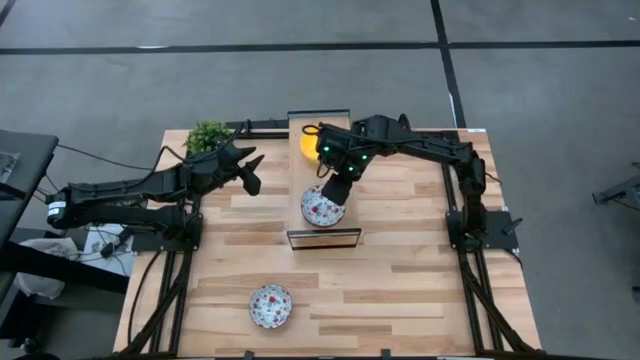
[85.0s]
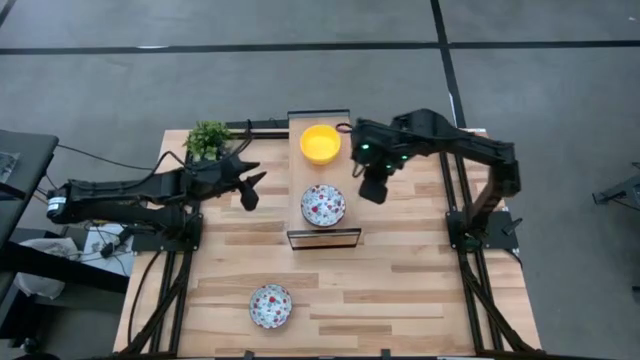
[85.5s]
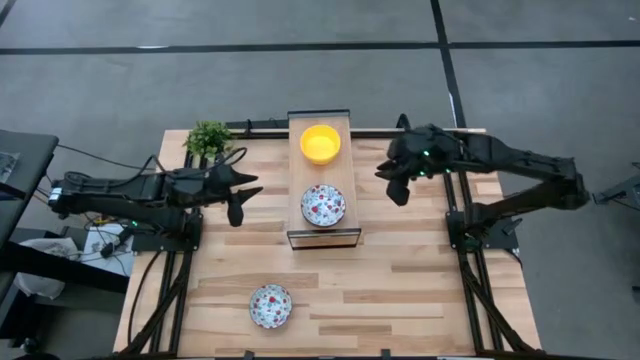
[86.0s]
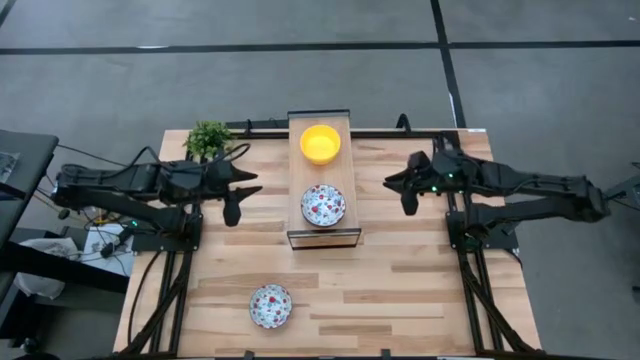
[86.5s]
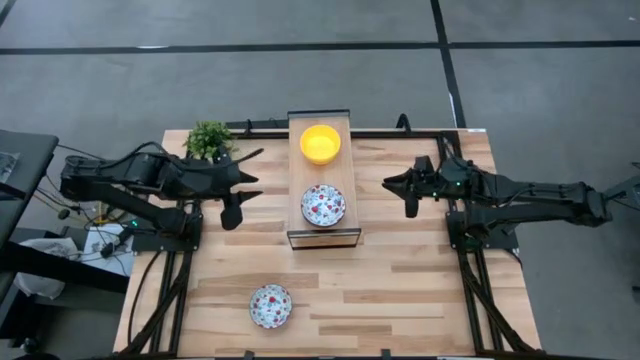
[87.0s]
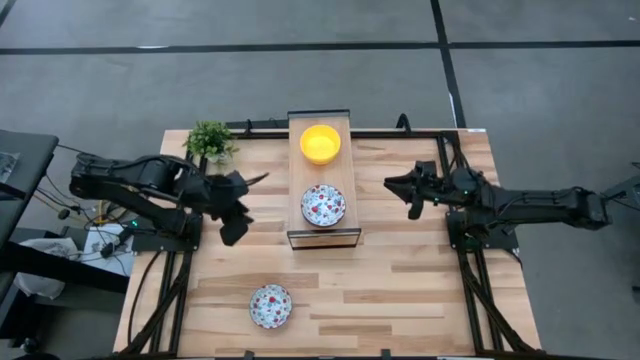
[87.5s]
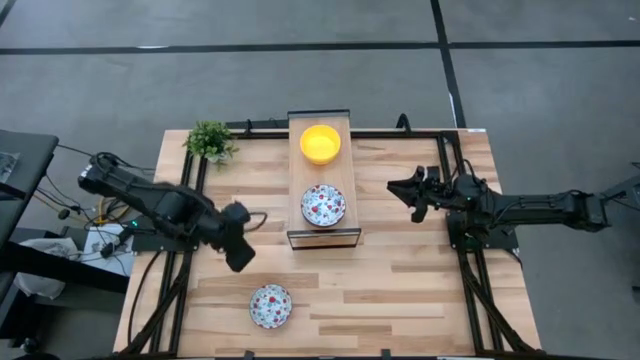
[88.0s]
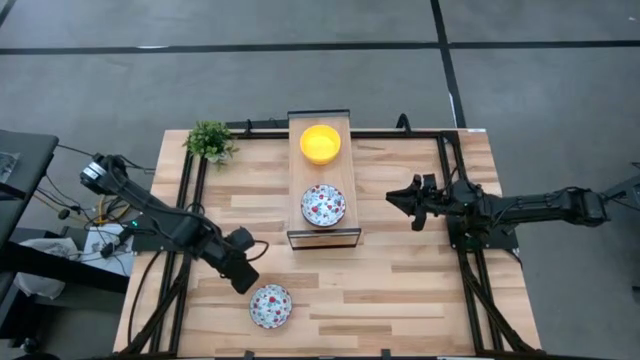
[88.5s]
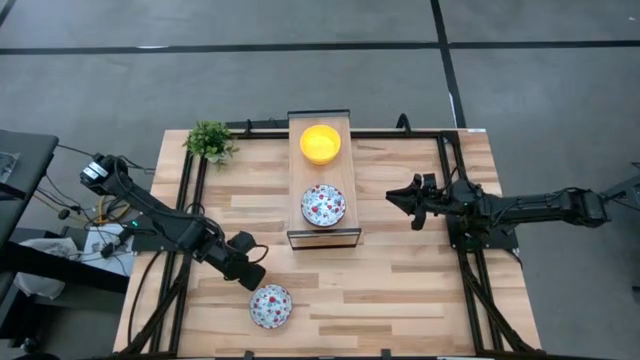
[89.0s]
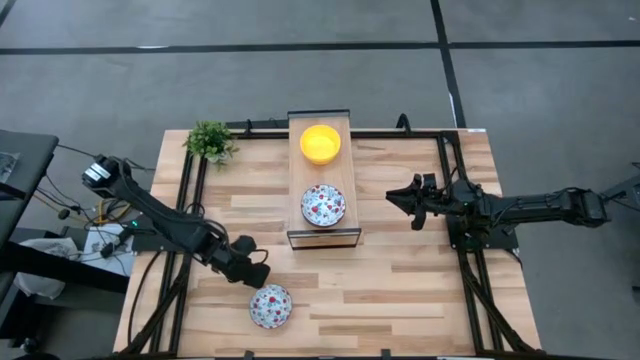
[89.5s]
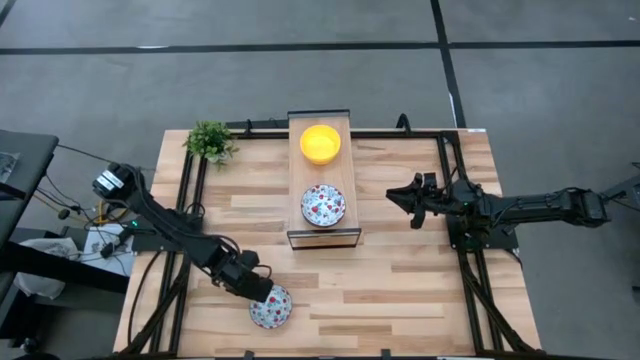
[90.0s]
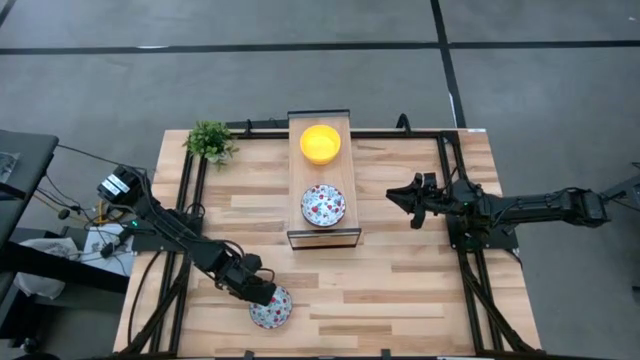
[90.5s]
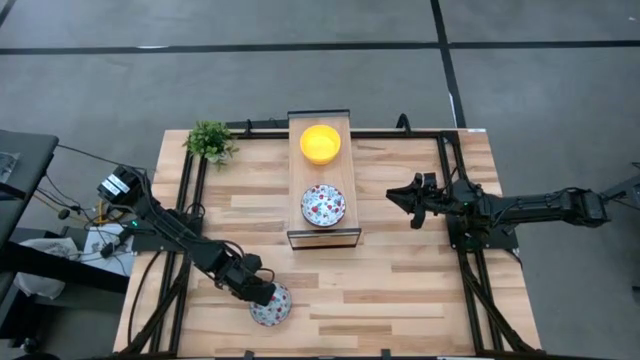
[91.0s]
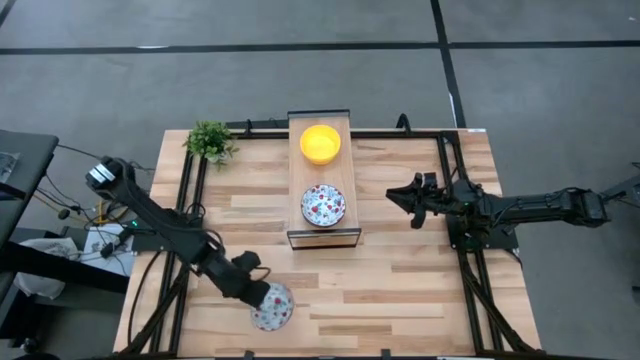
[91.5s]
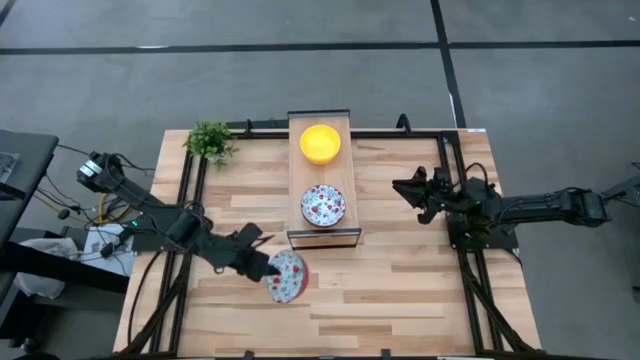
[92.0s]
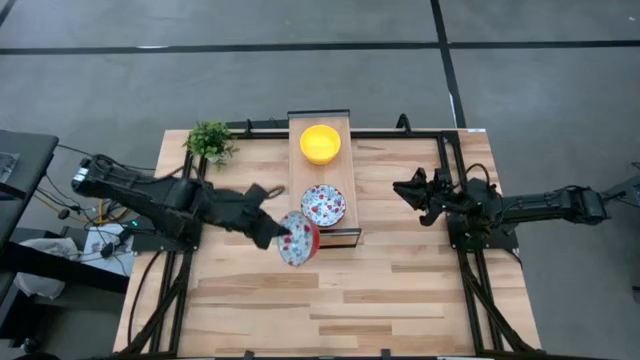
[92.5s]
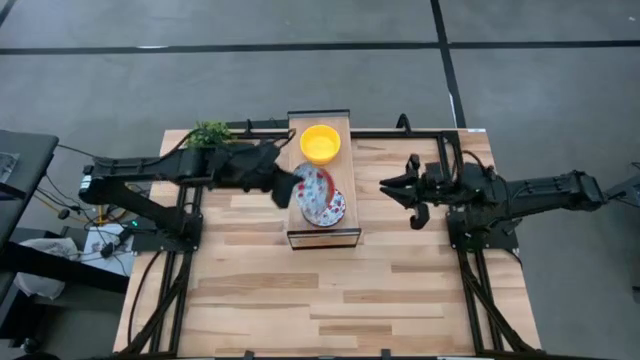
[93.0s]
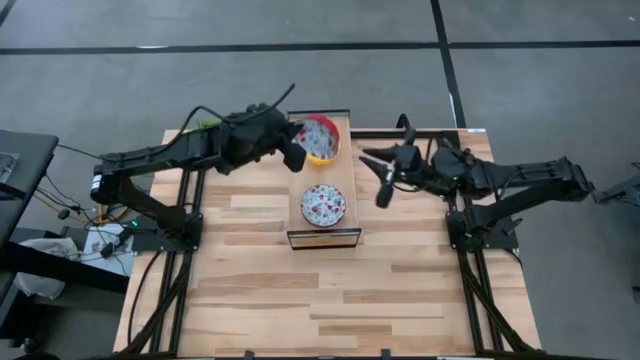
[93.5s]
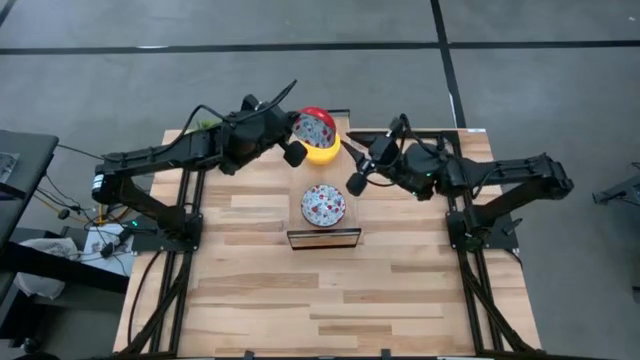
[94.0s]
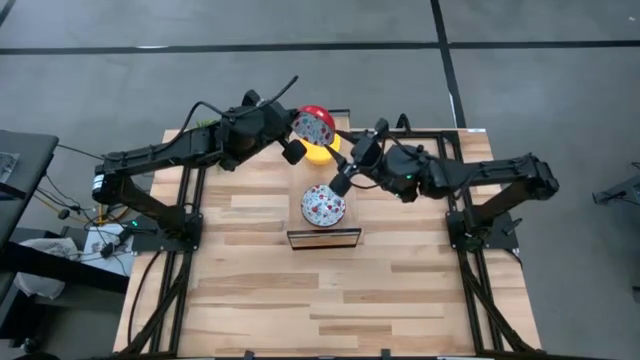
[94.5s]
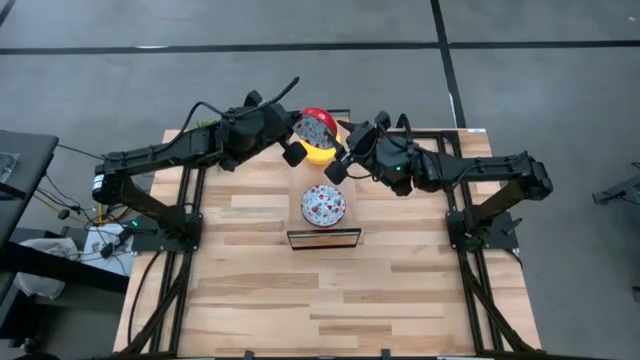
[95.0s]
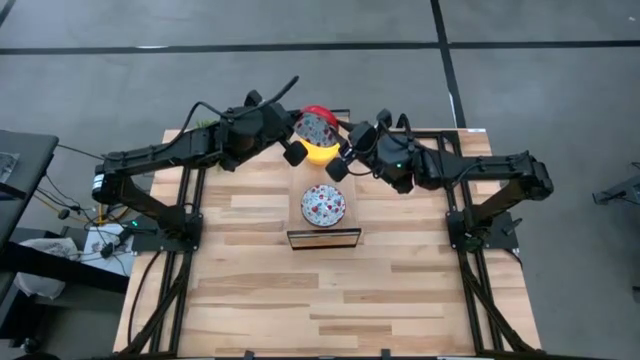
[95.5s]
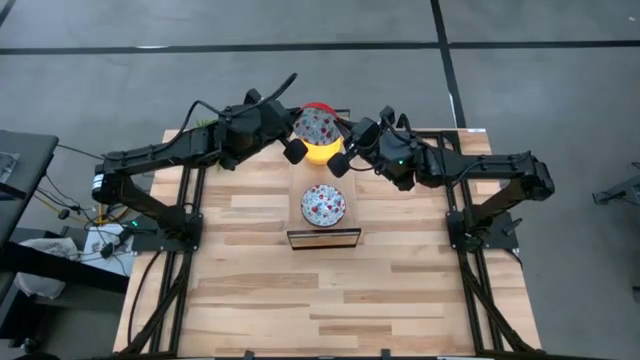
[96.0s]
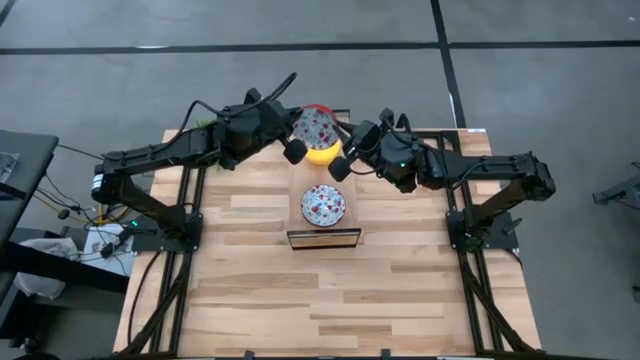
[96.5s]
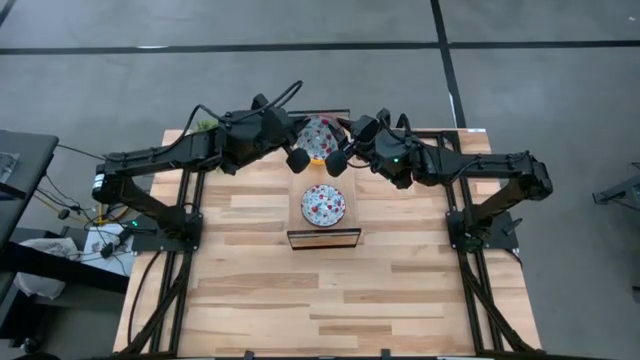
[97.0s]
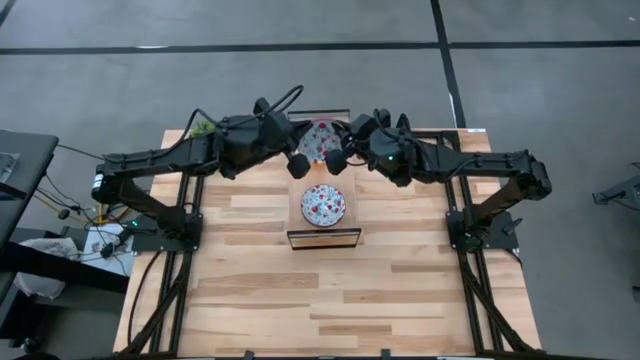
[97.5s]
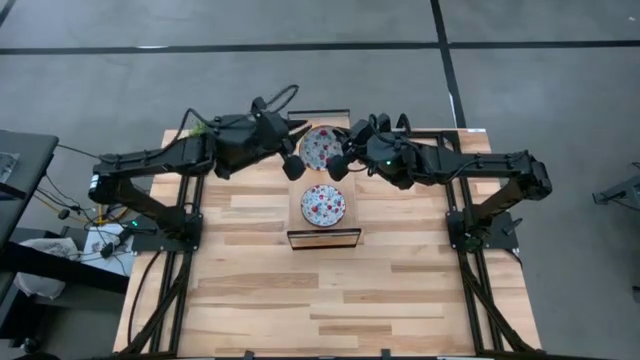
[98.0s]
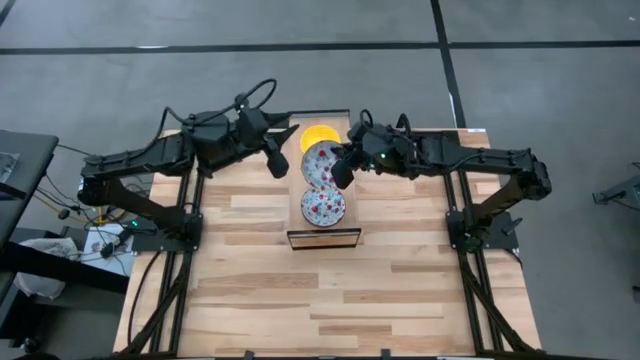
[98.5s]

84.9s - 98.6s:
Task: Pick & Place Mini bowls
Stack the red patterned bowl on top of the red patterned bowls on the shelf

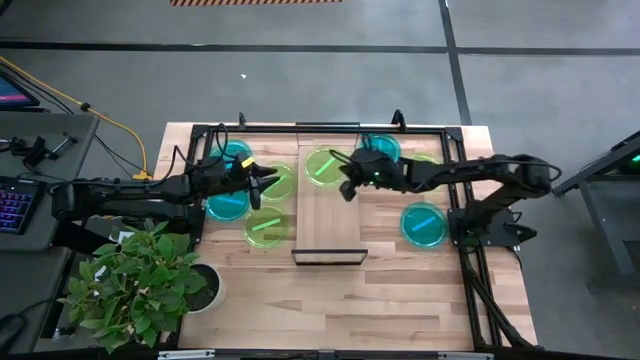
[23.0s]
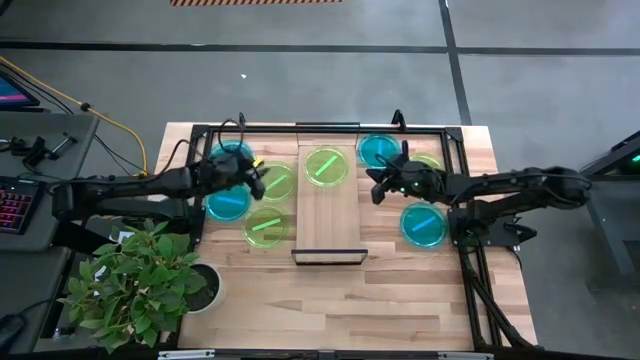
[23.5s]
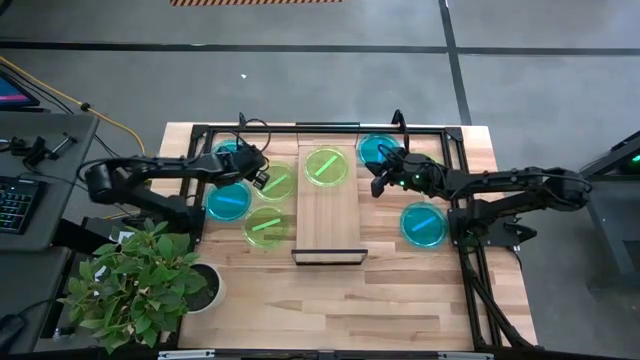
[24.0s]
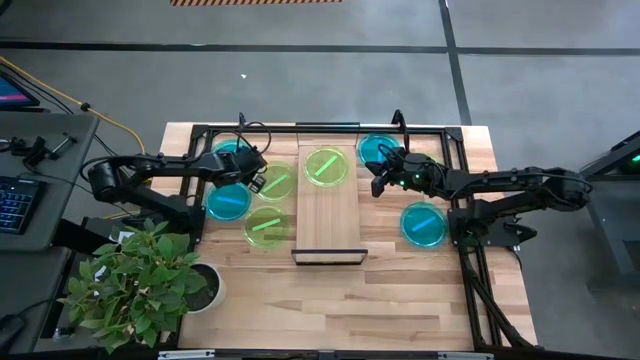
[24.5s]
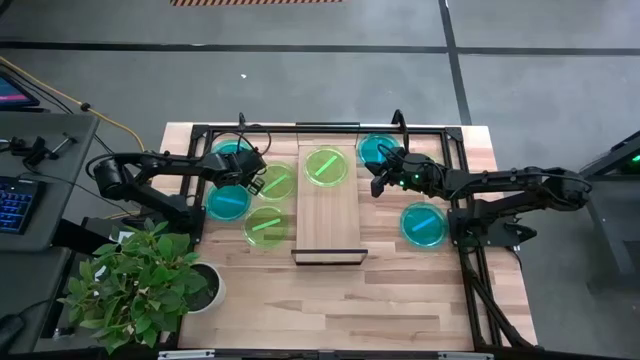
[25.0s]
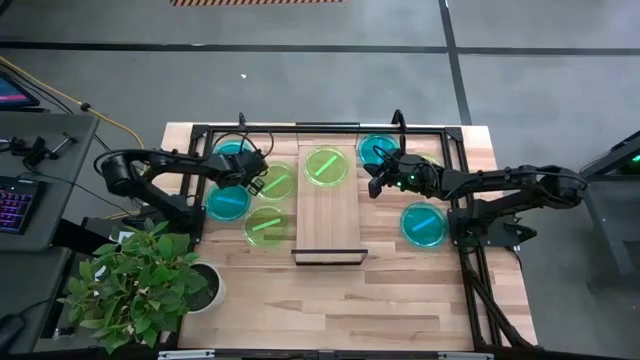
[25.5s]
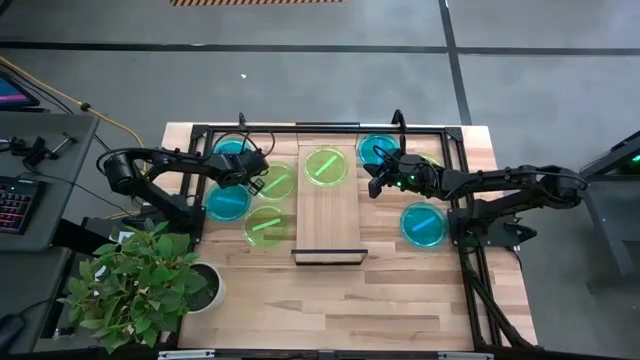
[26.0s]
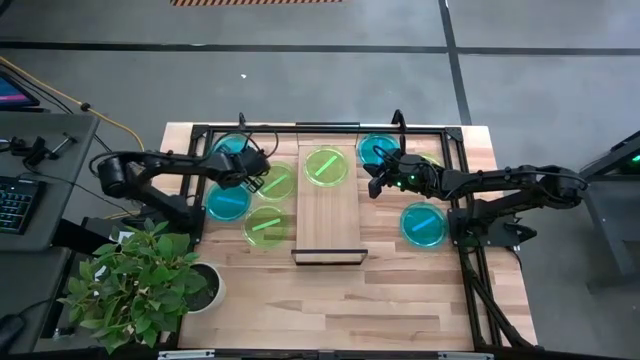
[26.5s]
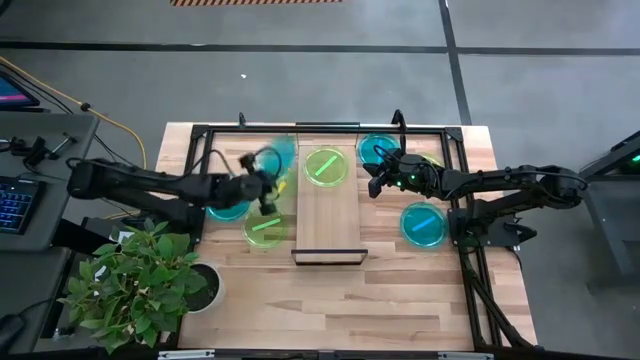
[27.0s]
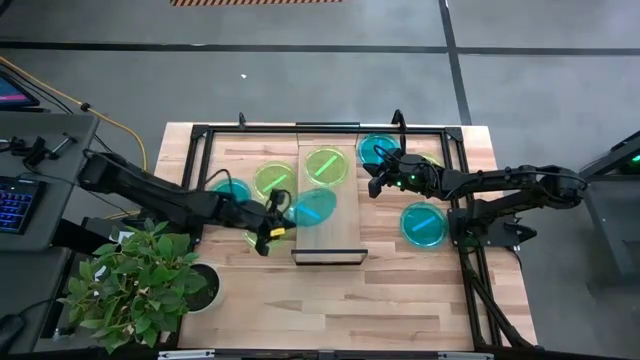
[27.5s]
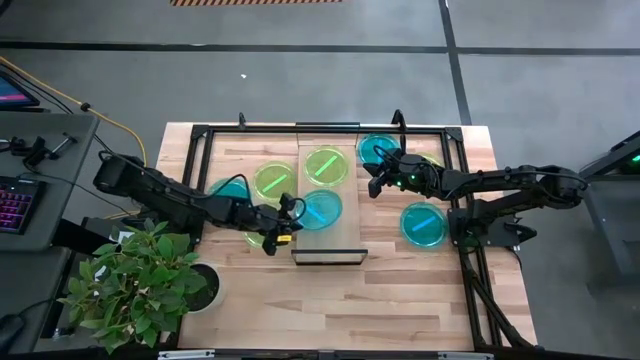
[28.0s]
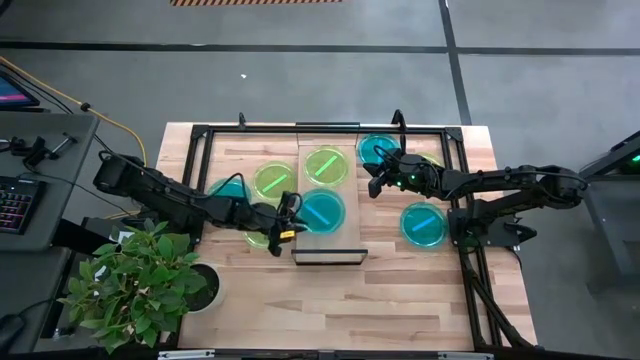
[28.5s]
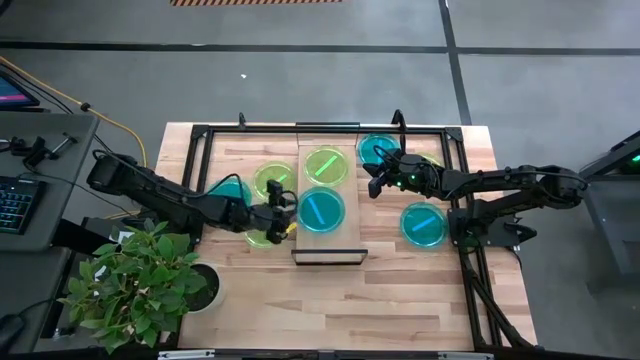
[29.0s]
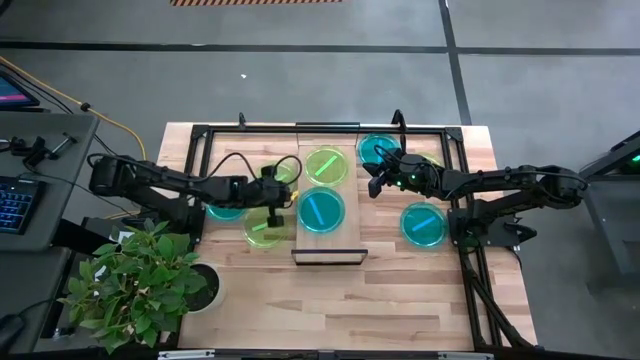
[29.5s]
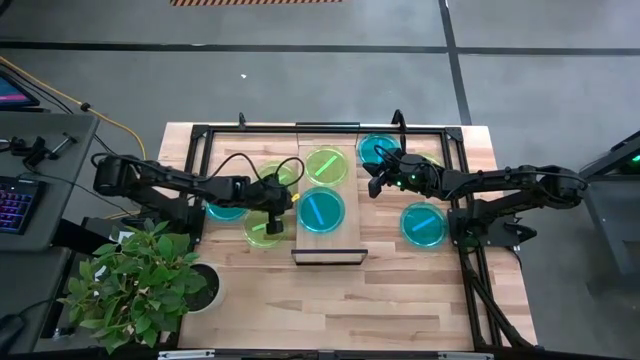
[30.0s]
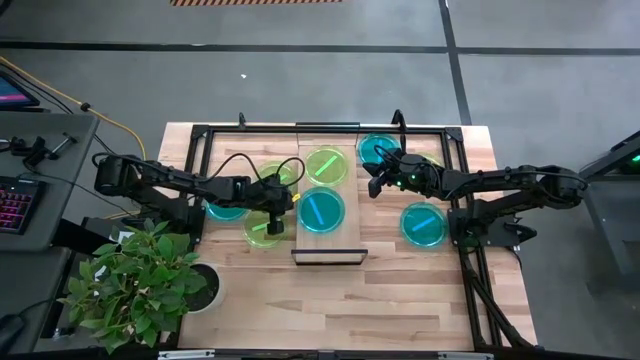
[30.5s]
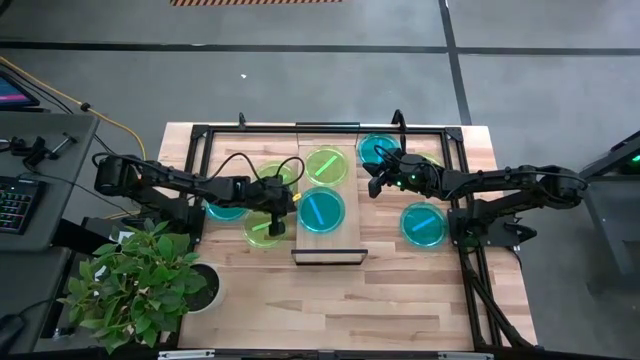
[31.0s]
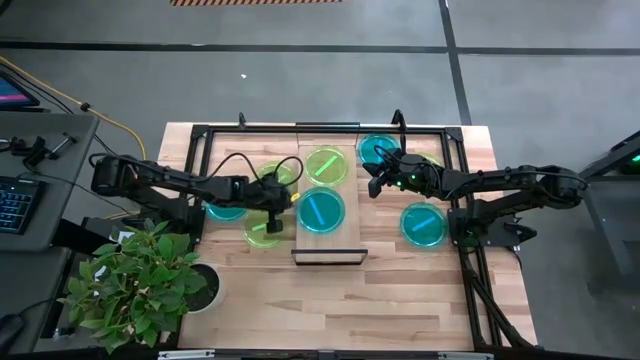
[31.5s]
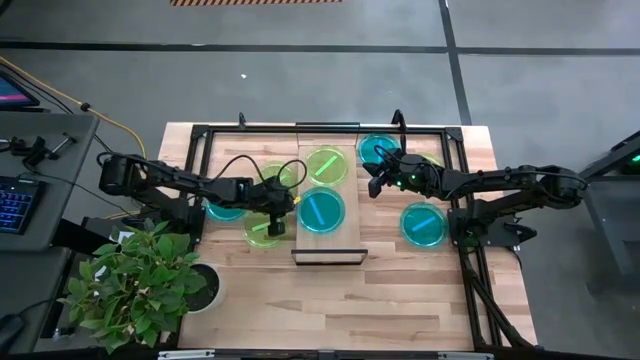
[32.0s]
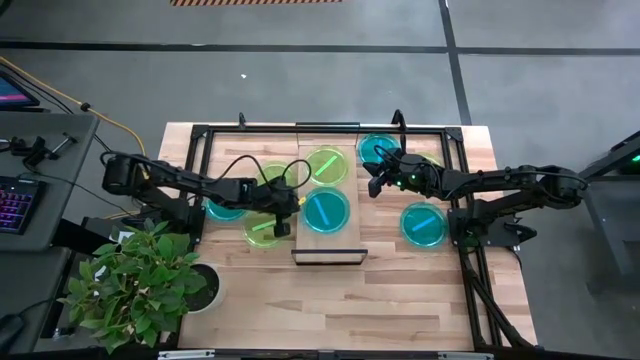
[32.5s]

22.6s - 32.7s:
Task: Place and stack plates onto a shelf
Put the top left blue plate on the shelf
